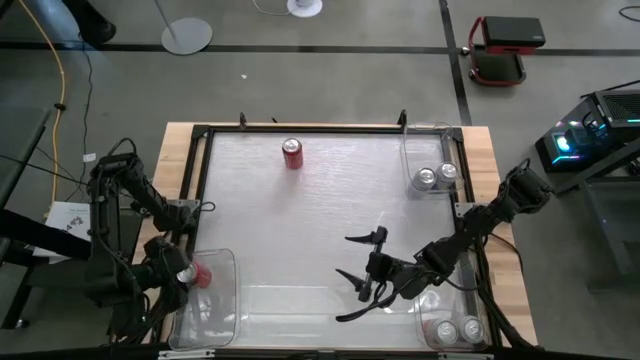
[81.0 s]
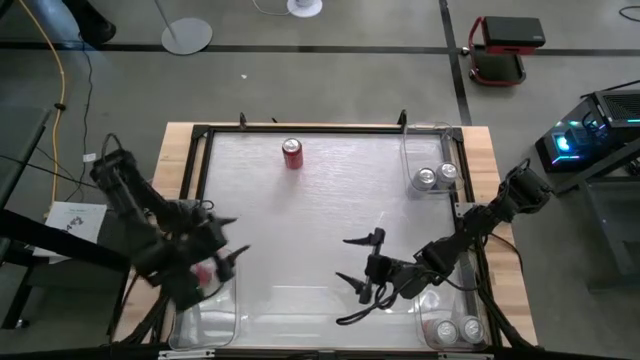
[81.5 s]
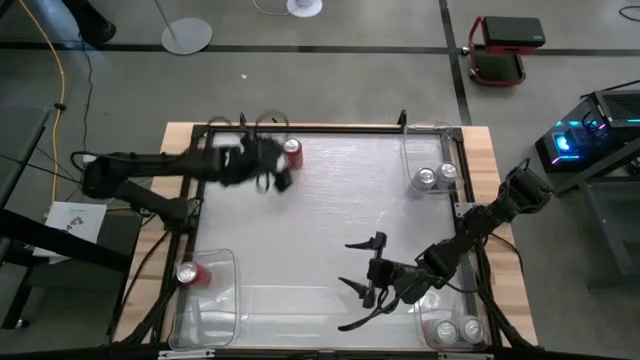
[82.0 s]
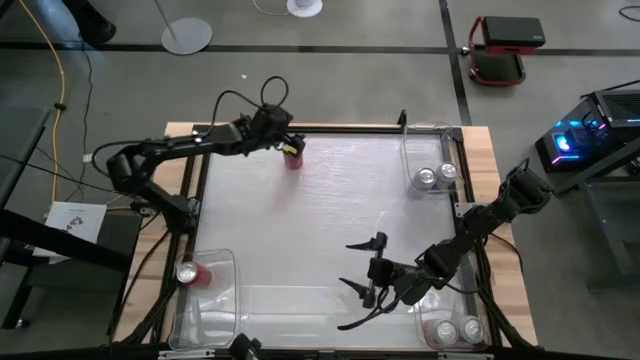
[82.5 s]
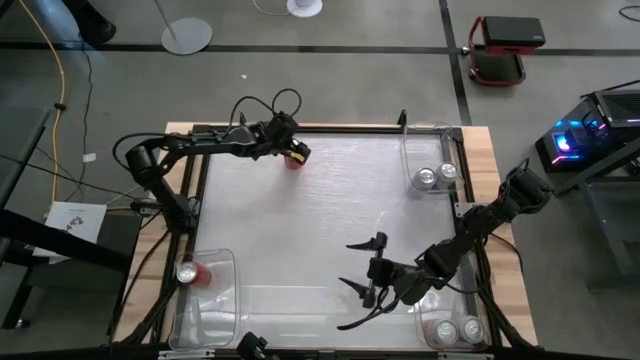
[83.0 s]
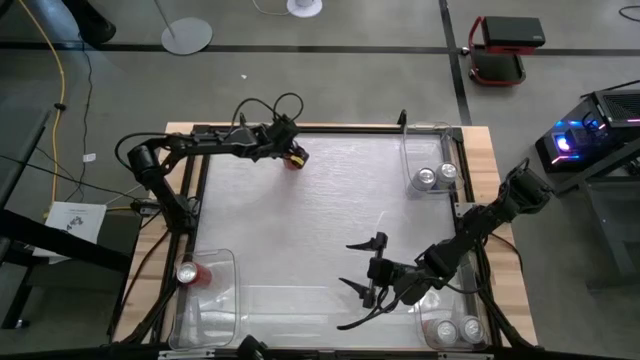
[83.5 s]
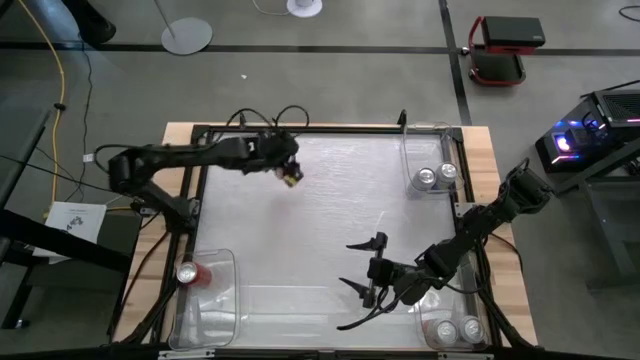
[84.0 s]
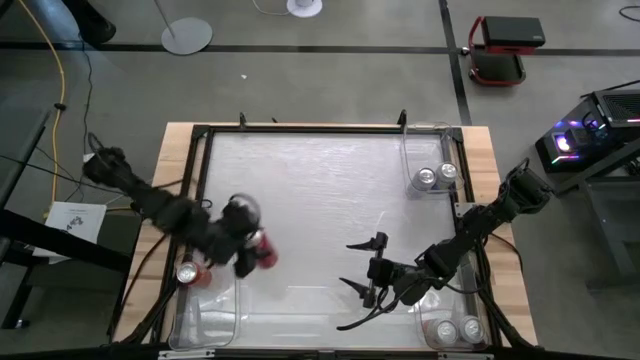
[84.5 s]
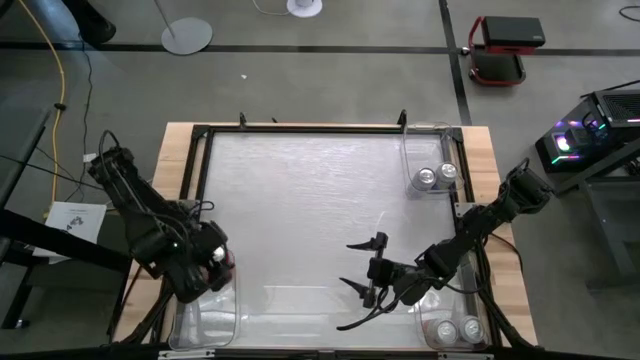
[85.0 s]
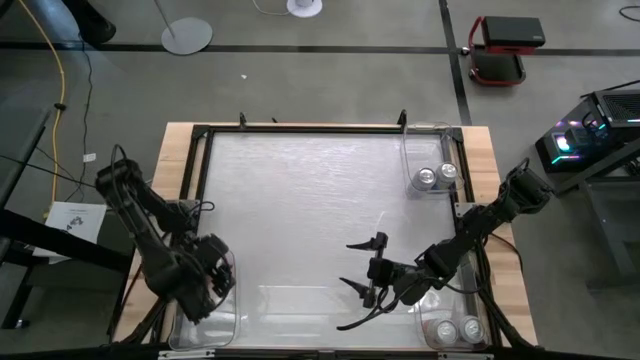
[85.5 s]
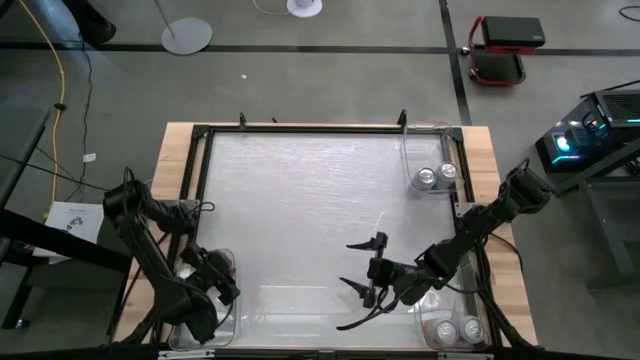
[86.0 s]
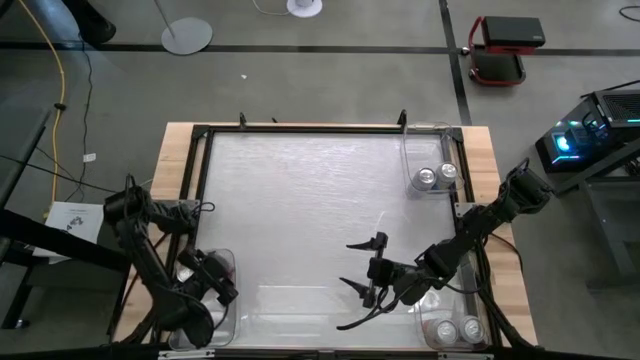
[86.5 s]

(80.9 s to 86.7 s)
Task: Sort soda cans
Put the red-black soda can into the bottom left transparent bin

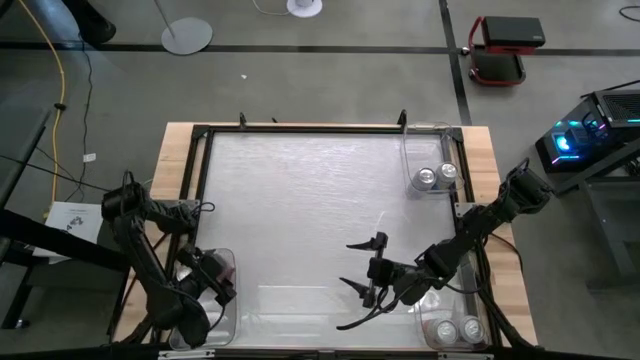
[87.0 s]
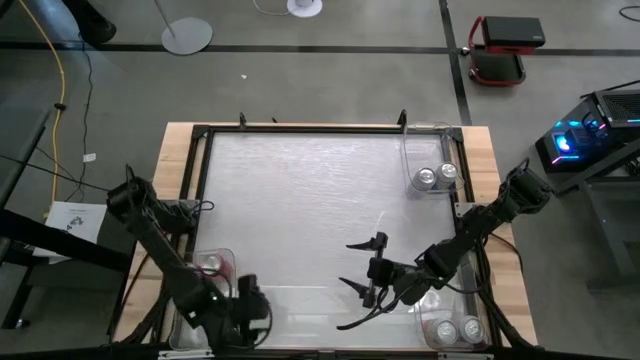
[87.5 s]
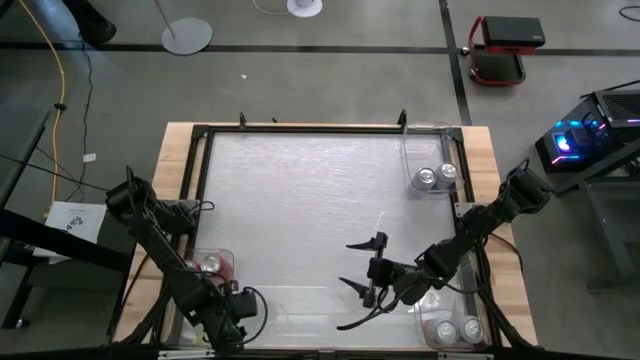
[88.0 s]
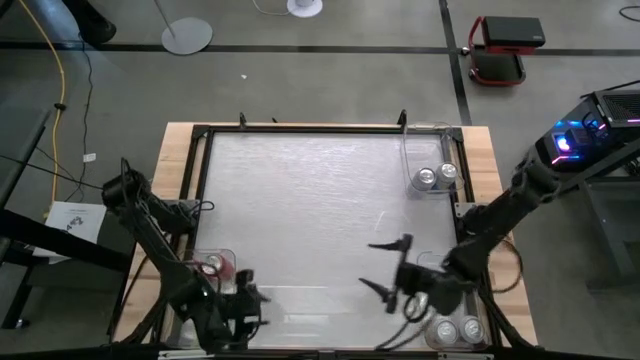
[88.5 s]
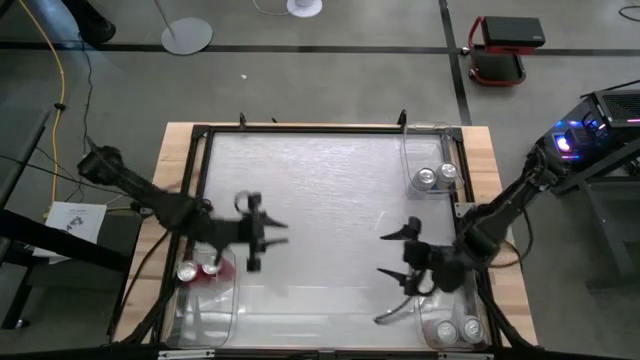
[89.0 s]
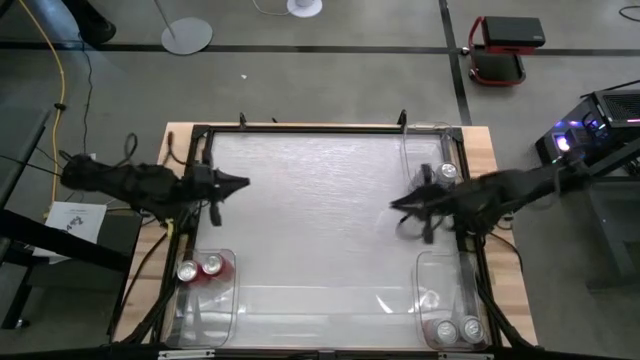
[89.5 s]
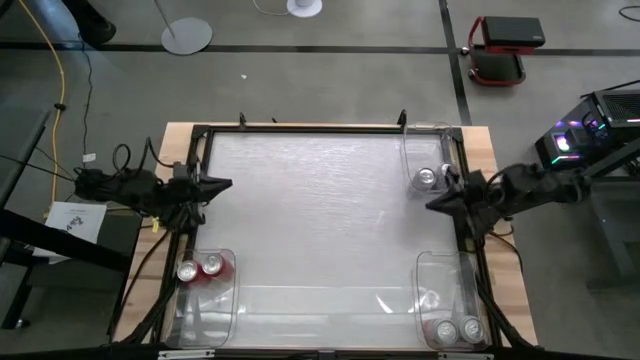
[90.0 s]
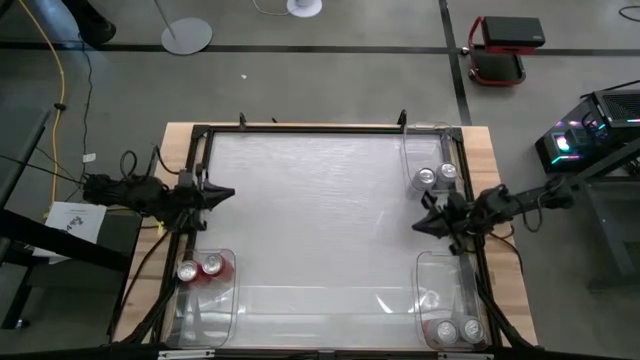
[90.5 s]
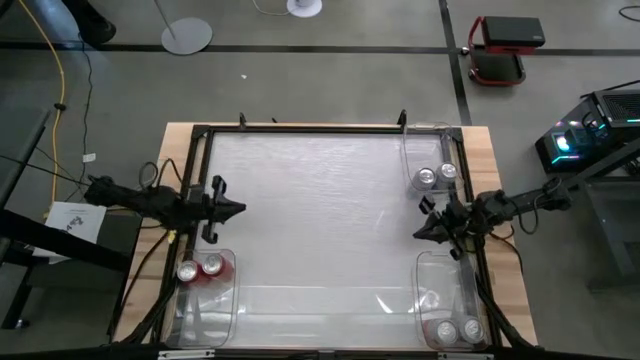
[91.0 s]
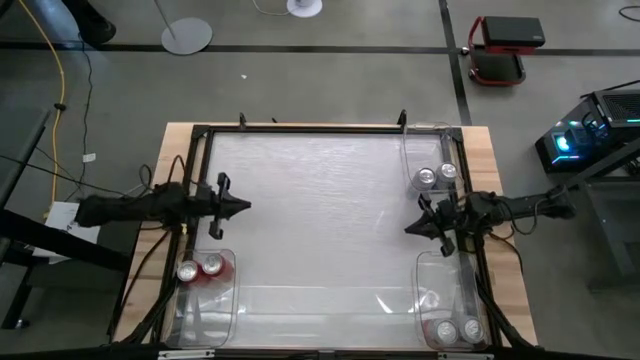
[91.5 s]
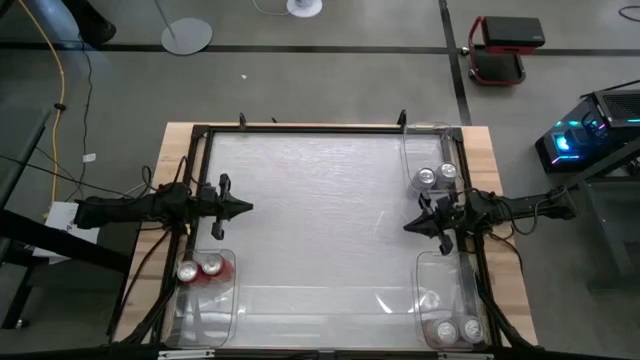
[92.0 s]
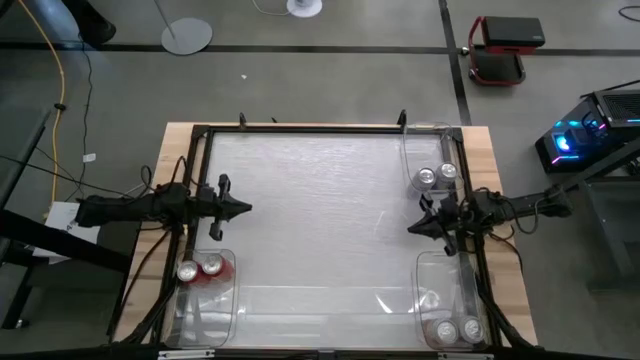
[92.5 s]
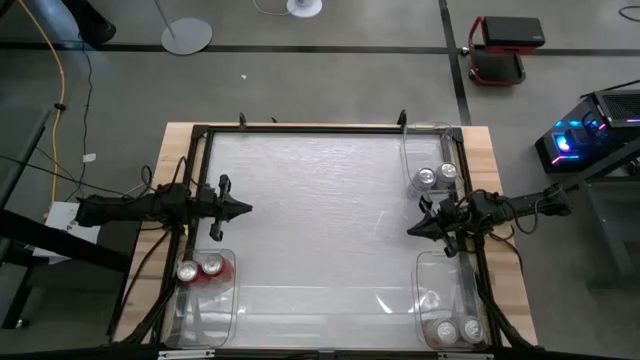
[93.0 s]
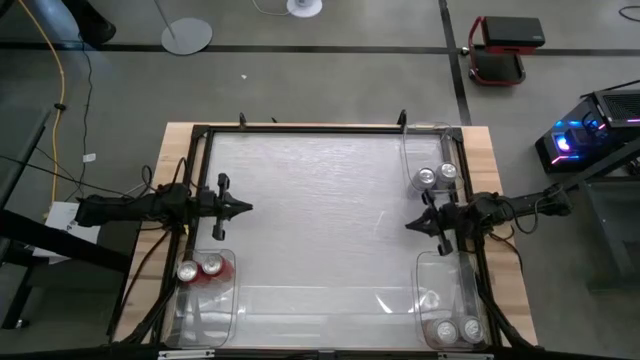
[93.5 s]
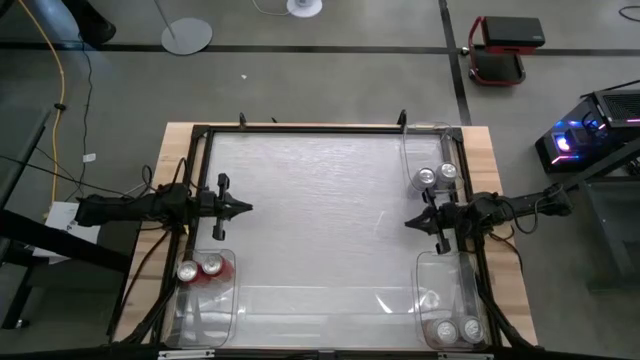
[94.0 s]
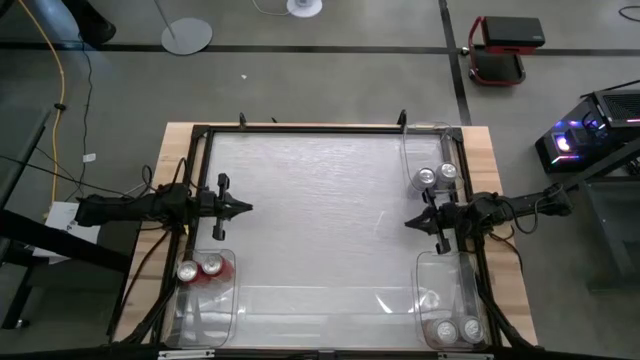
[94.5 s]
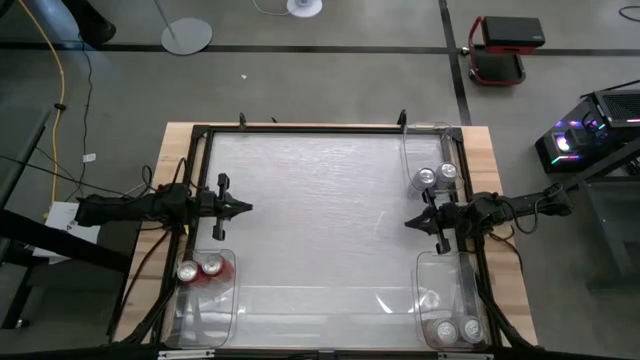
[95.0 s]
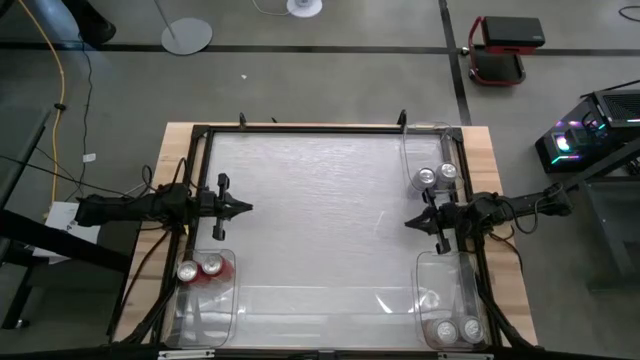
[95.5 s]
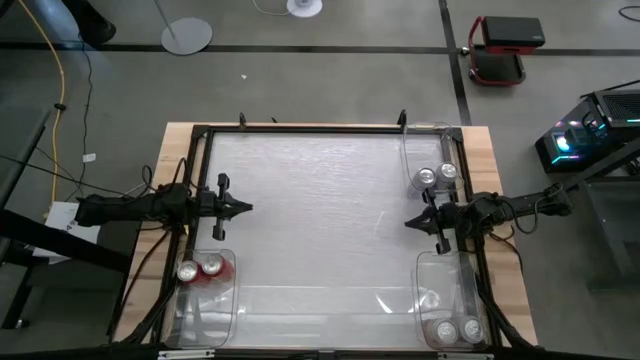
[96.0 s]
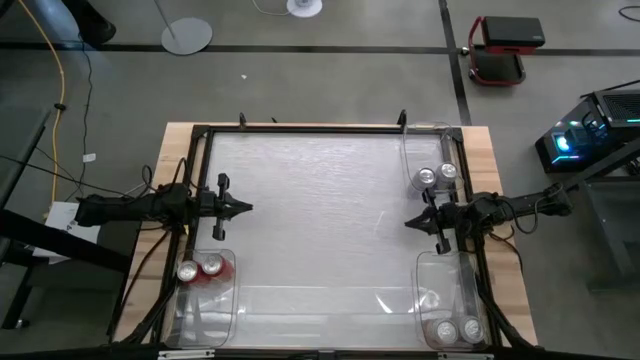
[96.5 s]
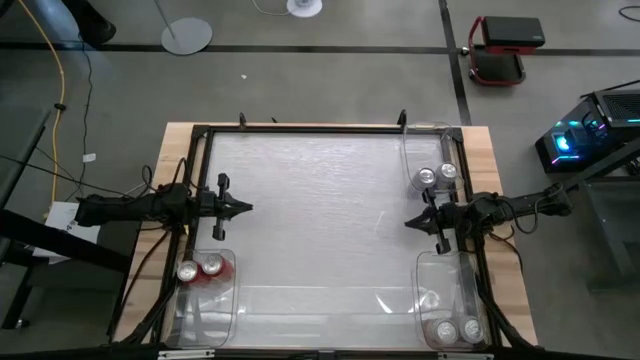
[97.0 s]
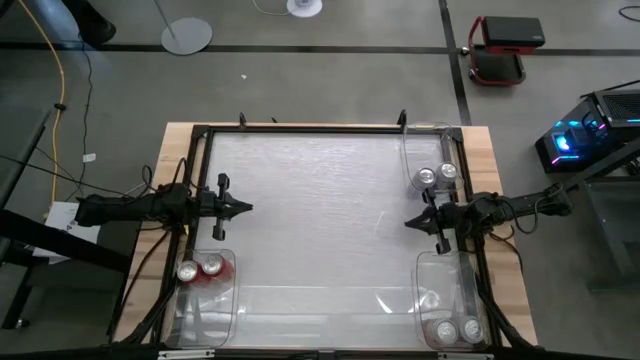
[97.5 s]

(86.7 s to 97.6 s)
Return to Home Position

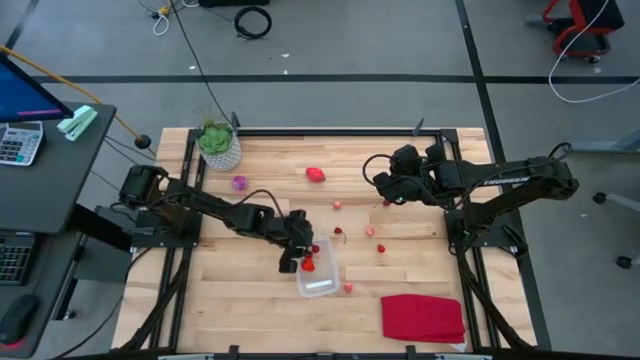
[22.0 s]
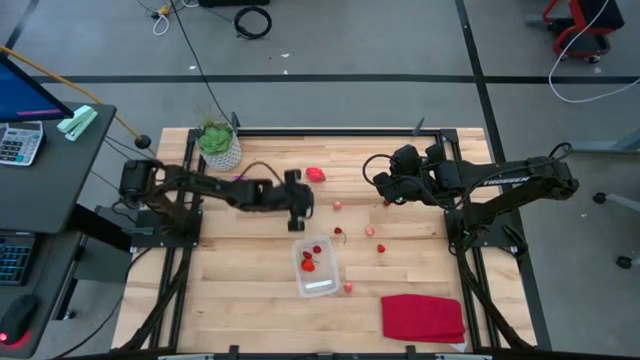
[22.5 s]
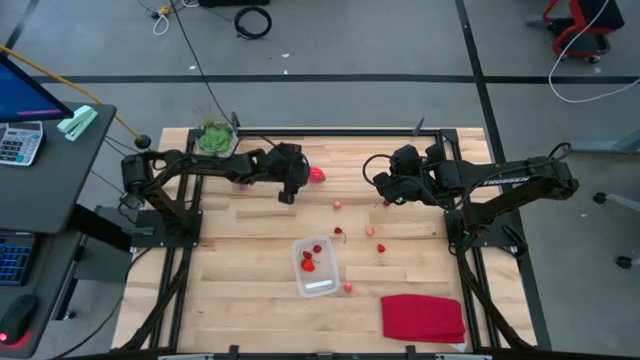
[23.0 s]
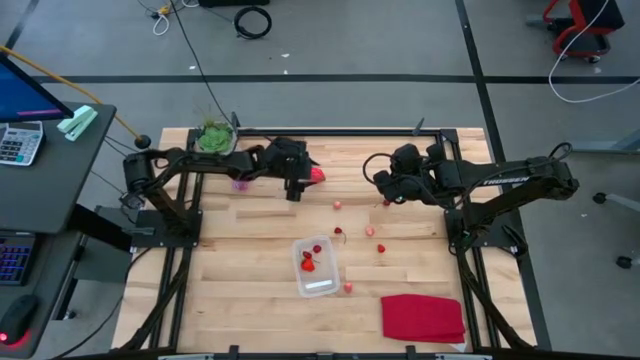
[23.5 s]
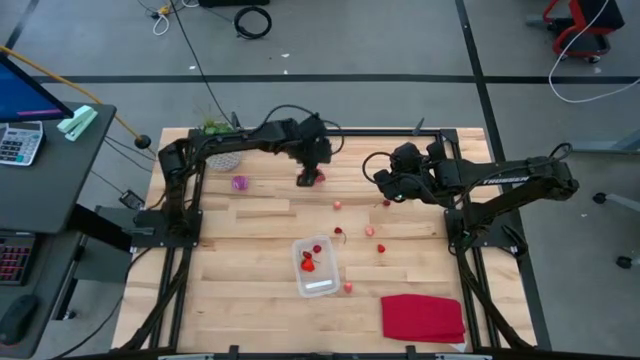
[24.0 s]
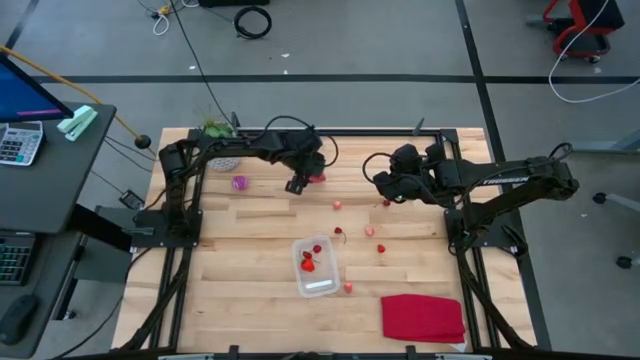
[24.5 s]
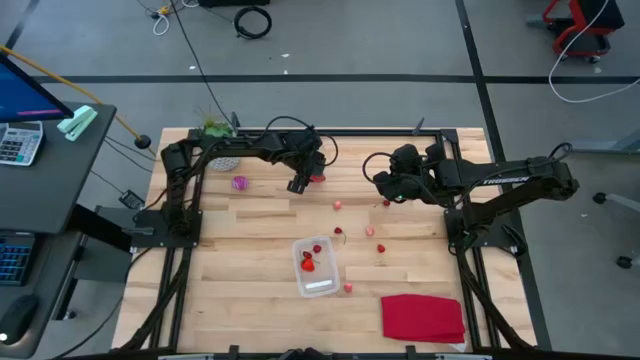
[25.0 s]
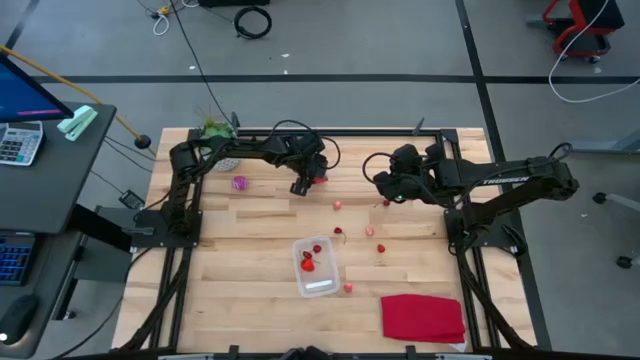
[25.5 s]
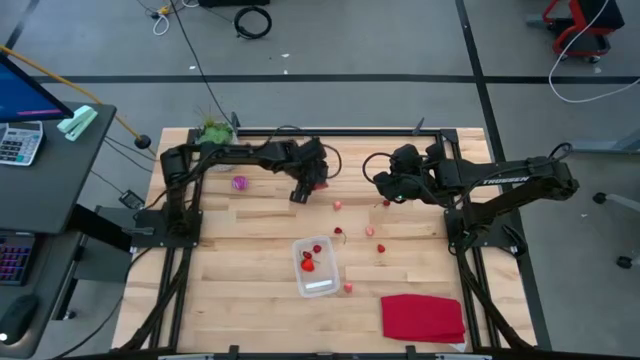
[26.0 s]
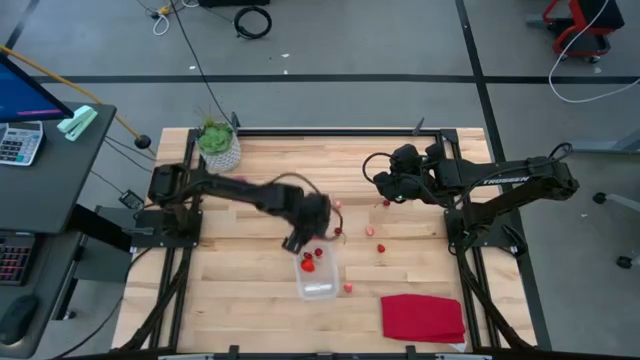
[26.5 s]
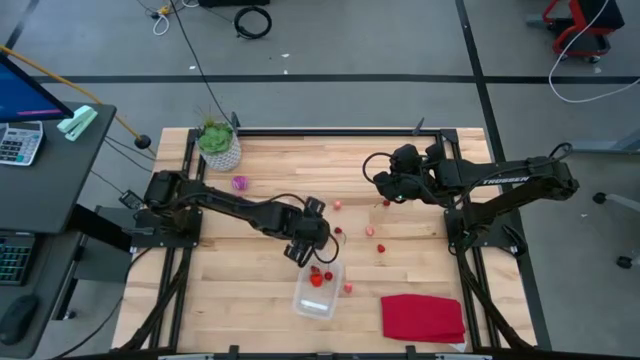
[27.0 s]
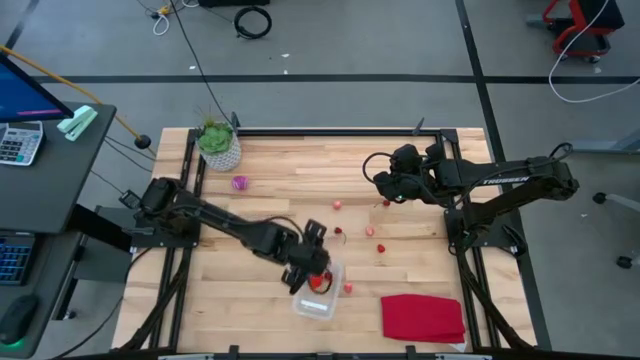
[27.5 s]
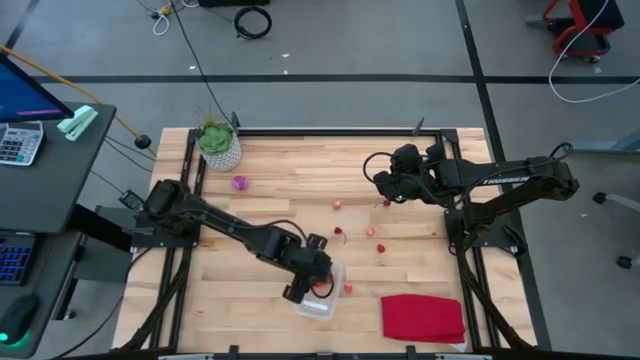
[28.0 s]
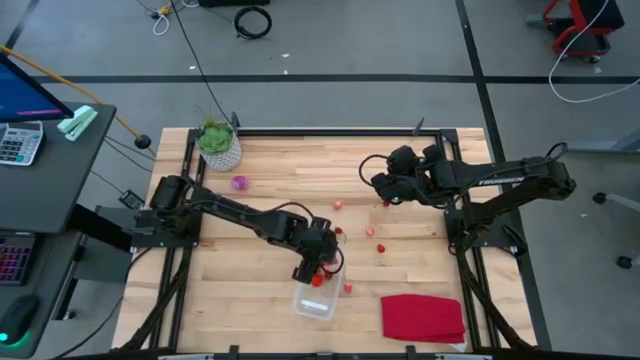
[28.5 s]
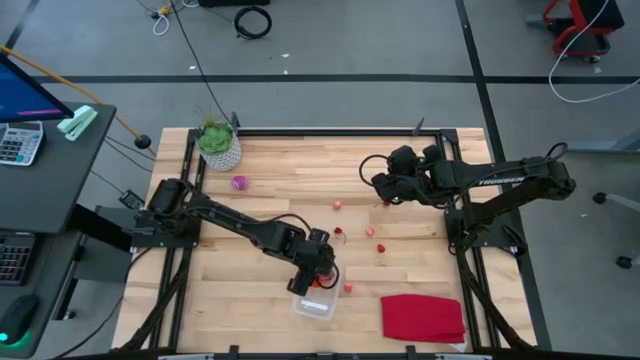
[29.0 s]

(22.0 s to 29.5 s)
Task: Pick and placing Produce into tupperware
Put the red dragon fruit into the transparent bin
